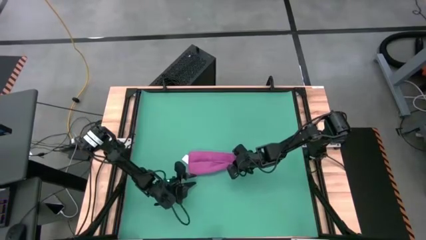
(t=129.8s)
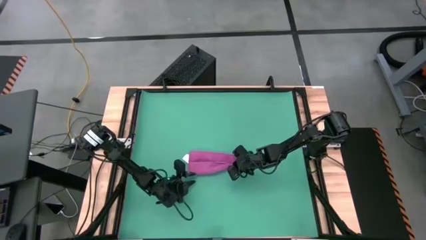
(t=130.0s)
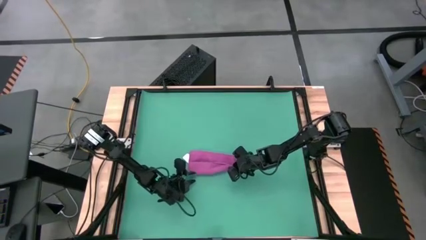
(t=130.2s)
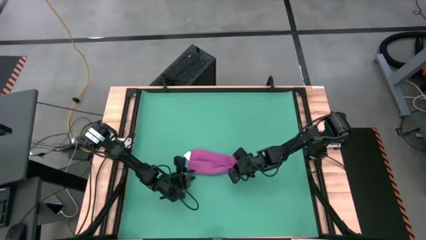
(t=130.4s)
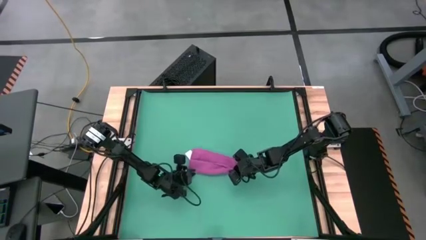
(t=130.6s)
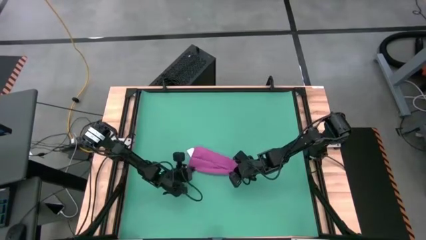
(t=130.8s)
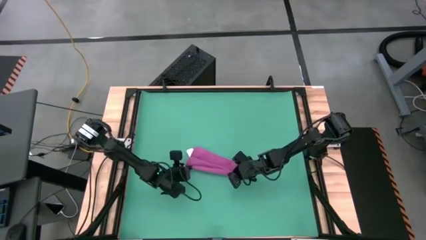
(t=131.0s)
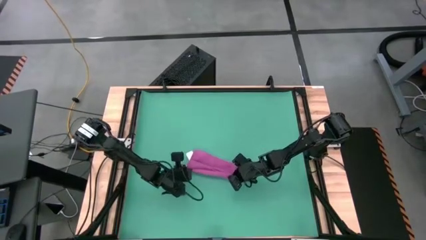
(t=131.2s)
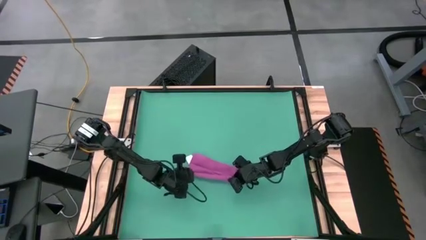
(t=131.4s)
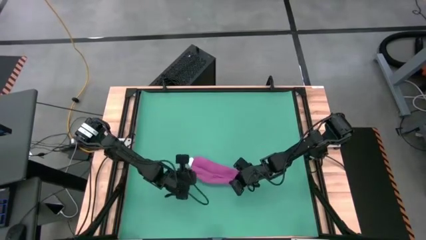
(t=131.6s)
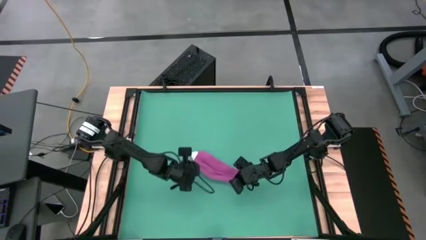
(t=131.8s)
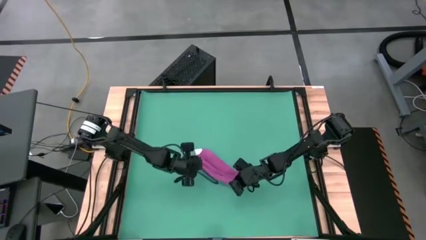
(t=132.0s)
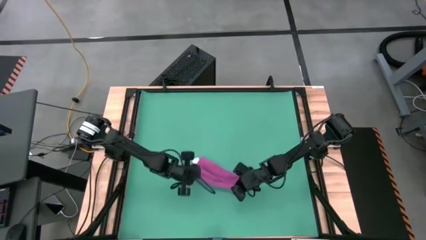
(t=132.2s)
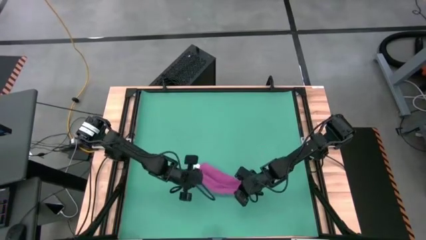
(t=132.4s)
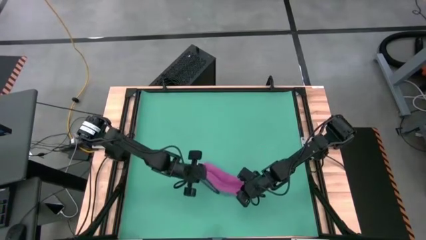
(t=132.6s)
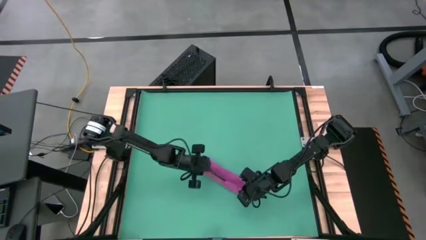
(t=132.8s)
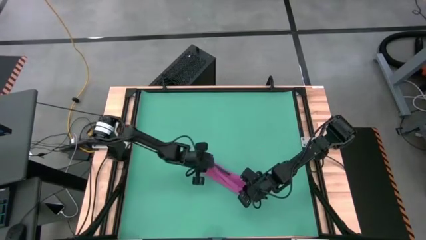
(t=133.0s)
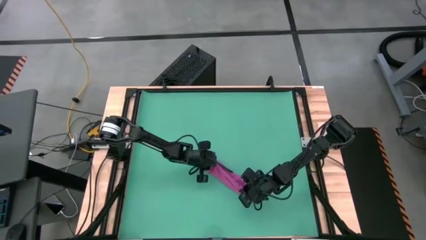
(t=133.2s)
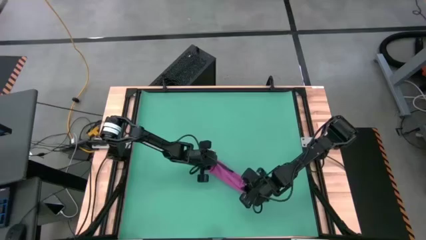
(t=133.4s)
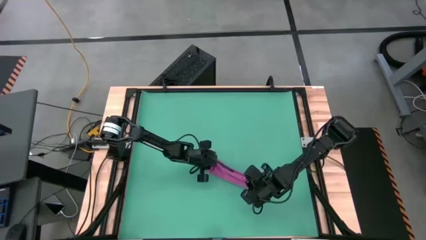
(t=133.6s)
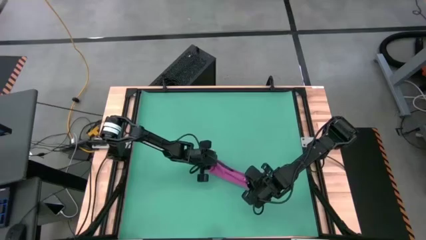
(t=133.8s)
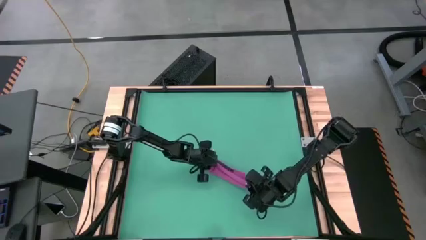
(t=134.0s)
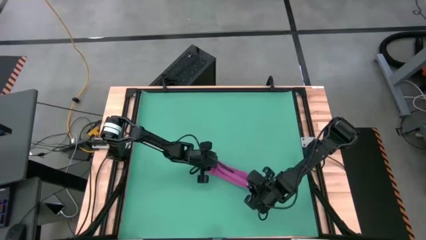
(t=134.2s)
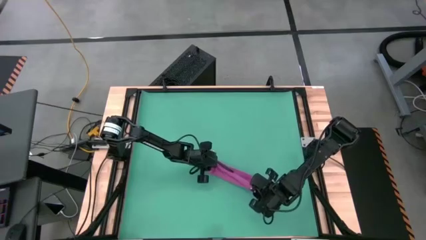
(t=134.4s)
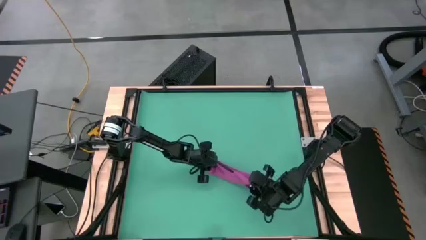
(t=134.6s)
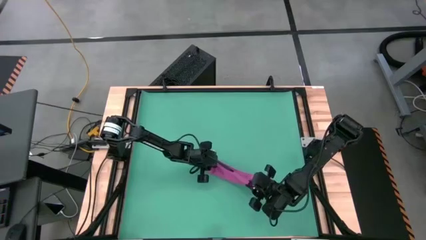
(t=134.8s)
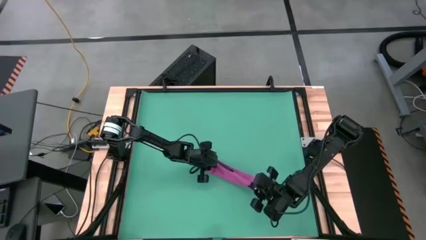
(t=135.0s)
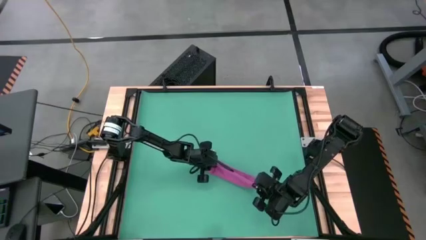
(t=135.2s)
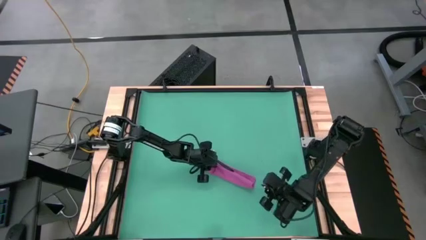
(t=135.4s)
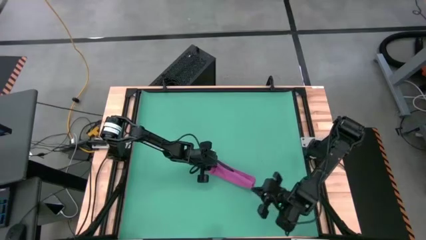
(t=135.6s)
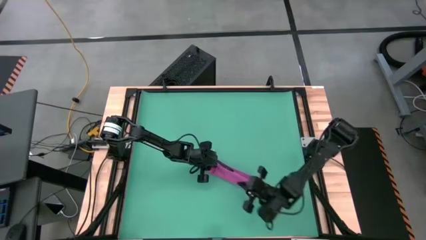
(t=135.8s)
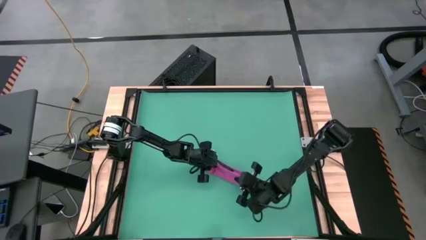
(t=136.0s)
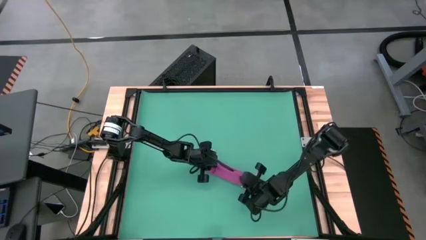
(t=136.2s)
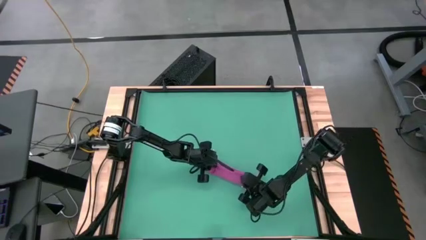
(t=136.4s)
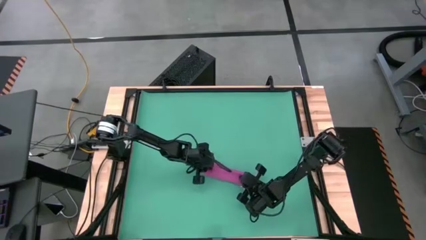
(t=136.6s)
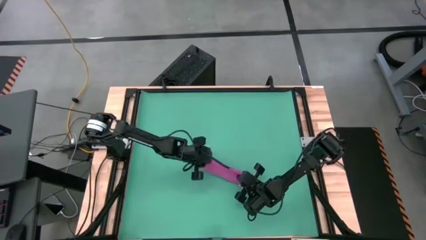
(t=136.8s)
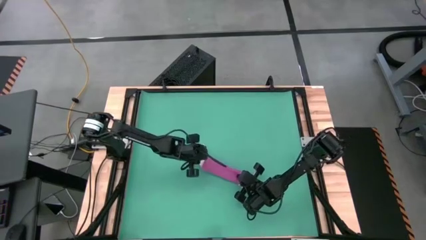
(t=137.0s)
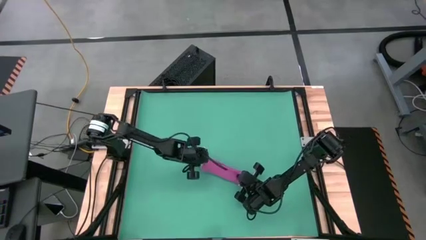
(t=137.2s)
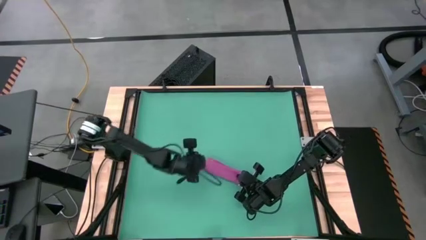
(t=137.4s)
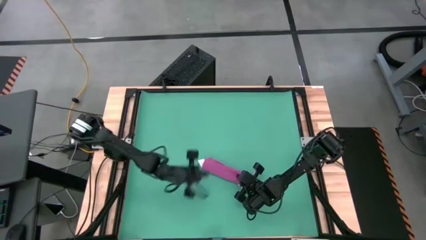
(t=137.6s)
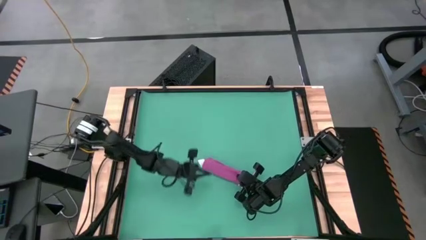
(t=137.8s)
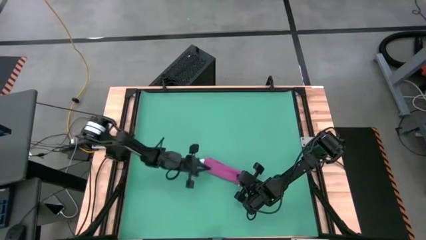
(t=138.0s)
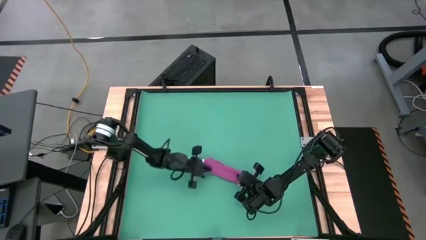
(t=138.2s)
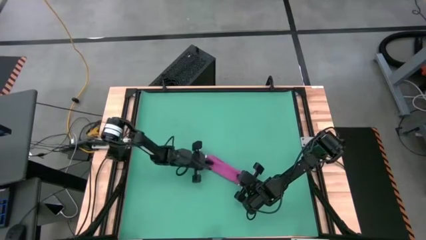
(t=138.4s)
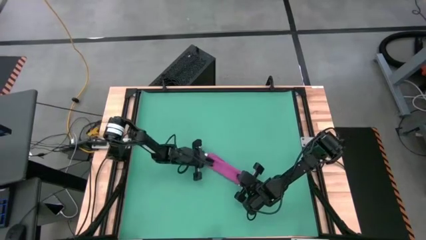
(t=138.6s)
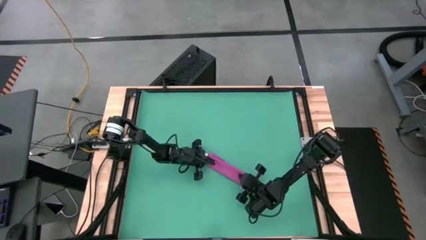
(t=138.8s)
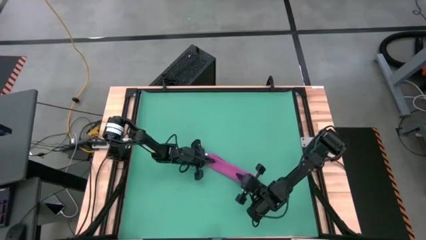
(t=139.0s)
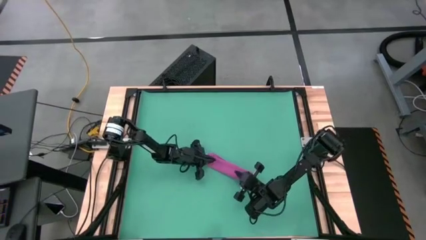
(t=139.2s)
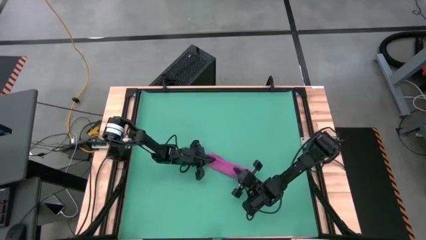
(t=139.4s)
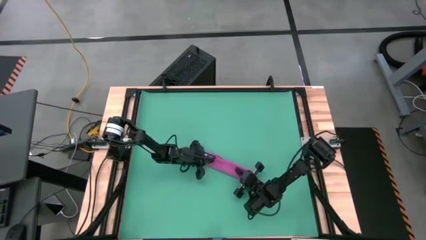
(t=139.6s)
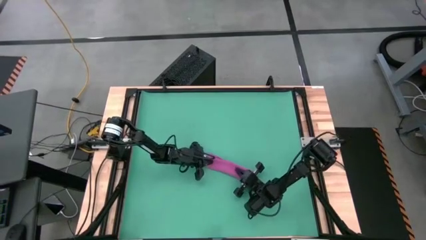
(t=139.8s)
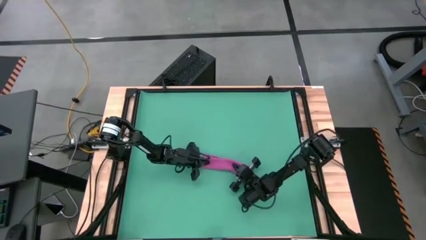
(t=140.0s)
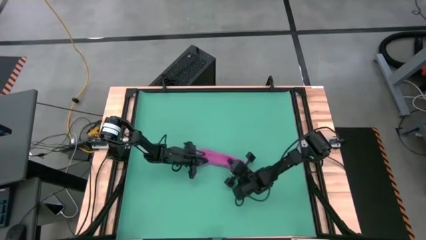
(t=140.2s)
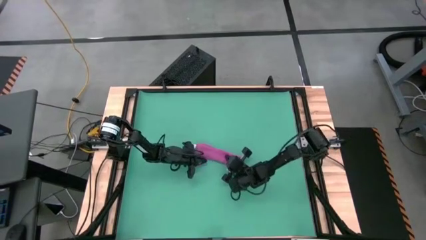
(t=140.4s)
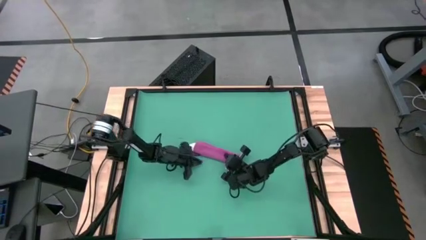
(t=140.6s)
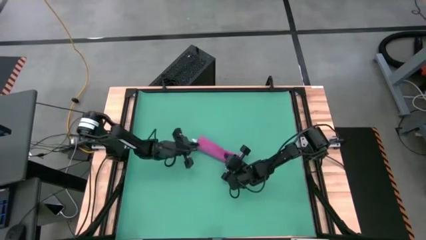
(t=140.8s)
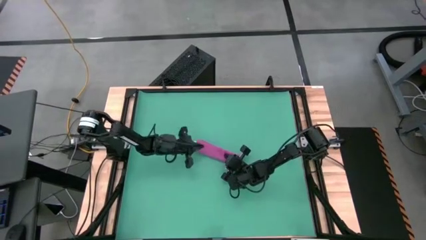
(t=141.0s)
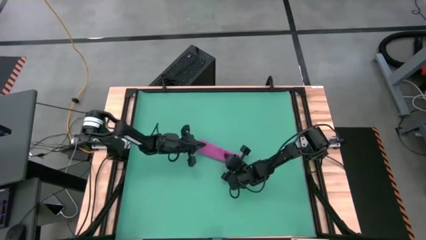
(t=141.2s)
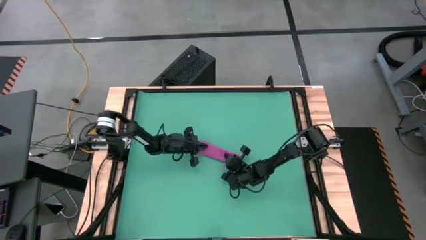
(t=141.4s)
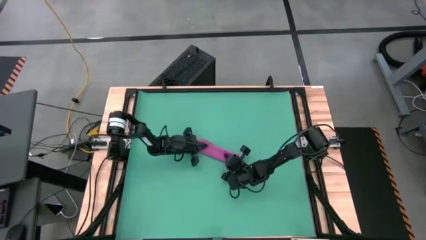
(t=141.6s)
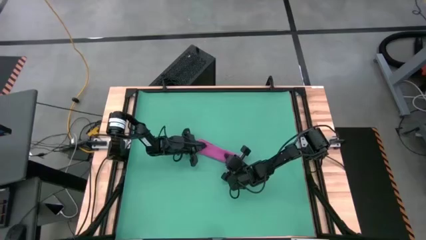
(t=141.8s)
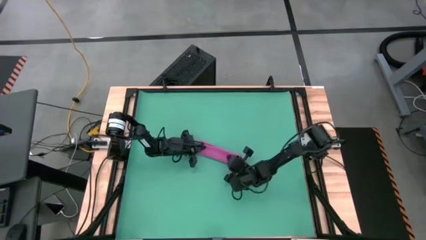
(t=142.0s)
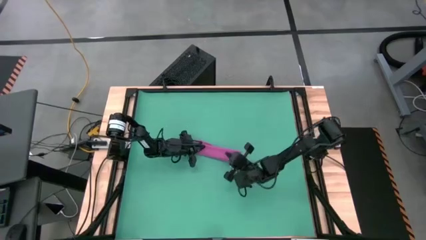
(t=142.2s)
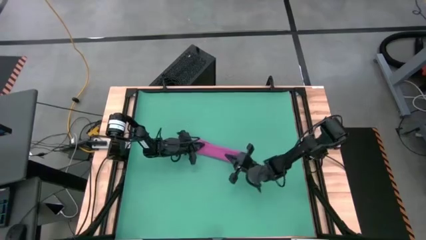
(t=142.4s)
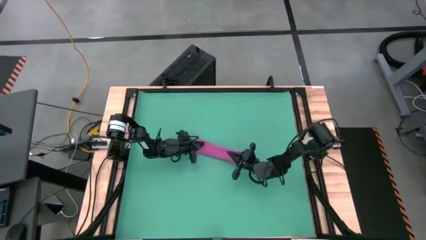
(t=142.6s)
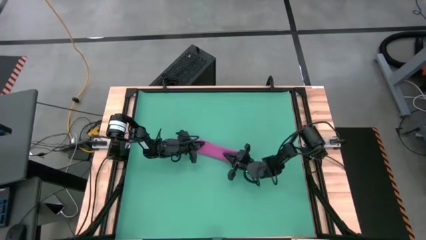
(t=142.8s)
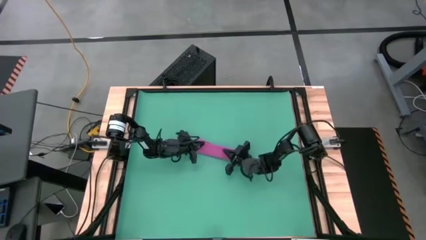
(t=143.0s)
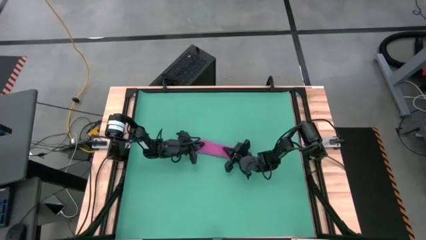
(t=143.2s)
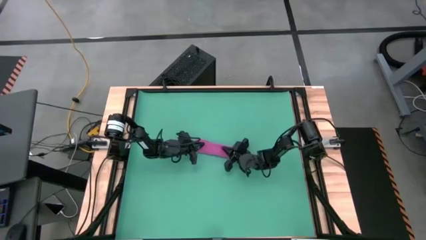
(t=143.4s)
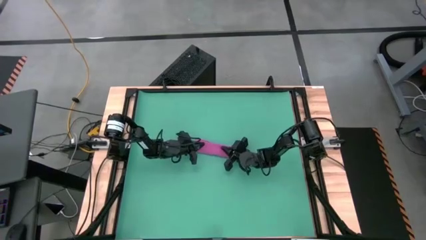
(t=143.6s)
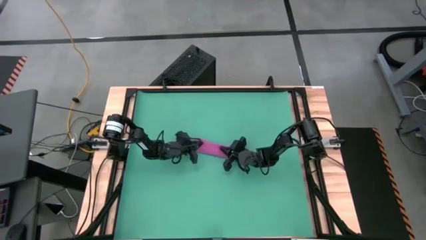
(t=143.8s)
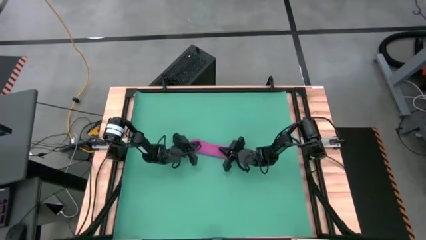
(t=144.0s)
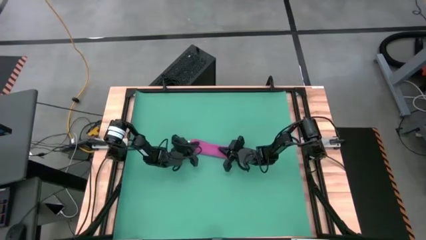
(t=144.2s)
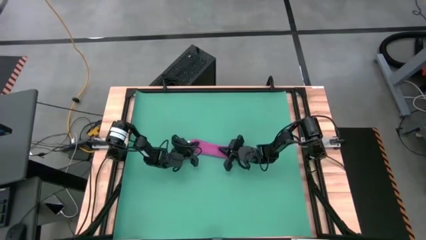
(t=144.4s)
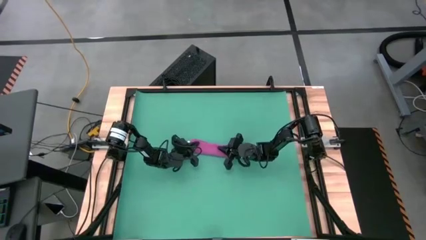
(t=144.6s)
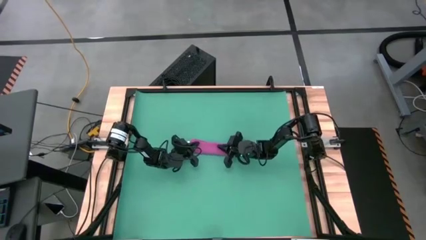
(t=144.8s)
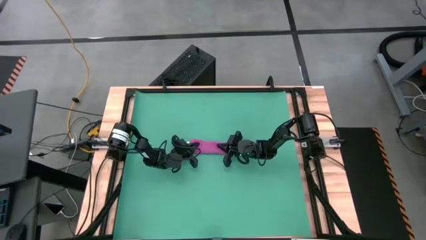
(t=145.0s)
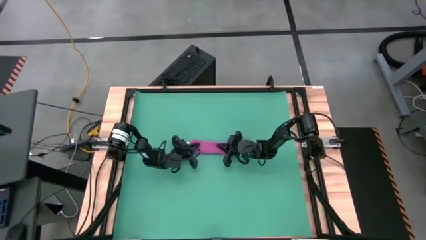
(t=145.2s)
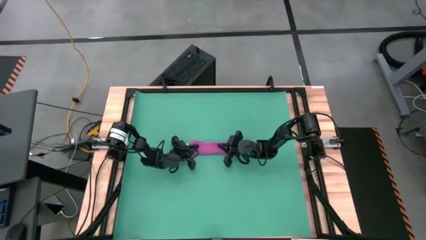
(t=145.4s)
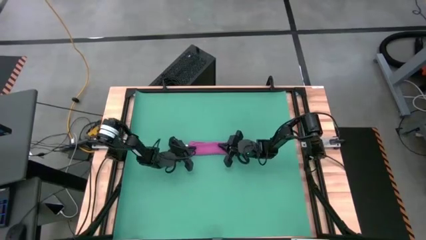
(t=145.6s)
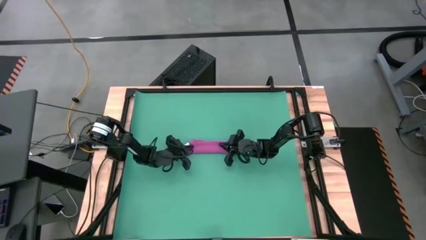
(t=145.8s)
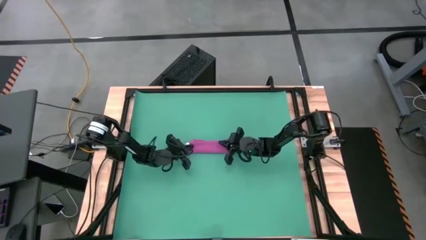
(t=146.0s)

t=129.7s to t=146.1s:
Task: Roll towel
Roll the pink towel
